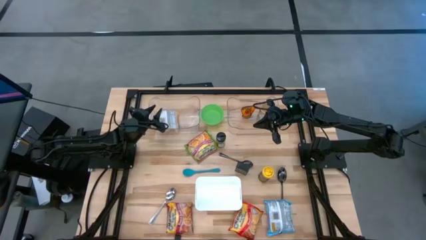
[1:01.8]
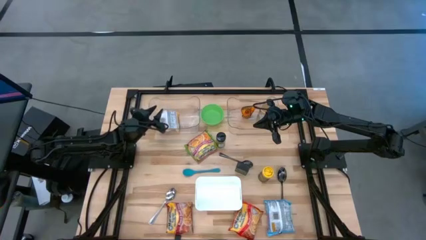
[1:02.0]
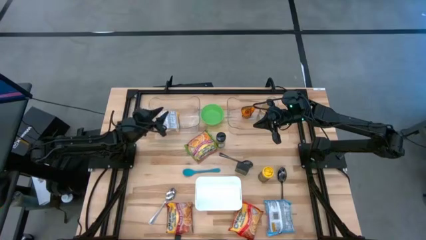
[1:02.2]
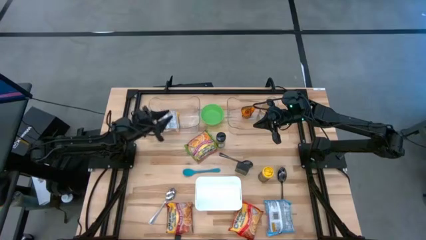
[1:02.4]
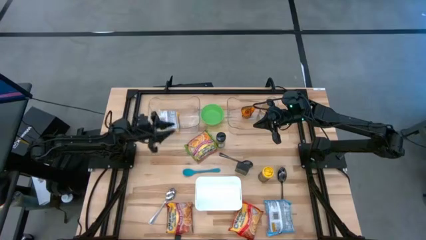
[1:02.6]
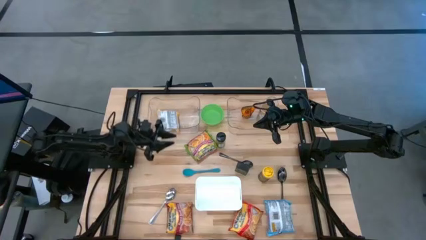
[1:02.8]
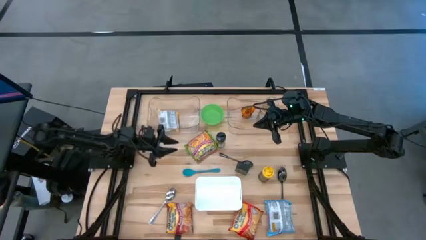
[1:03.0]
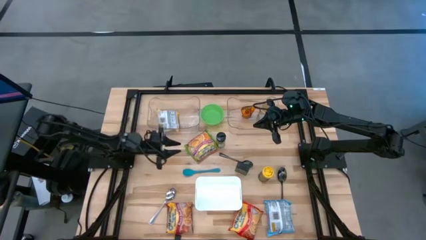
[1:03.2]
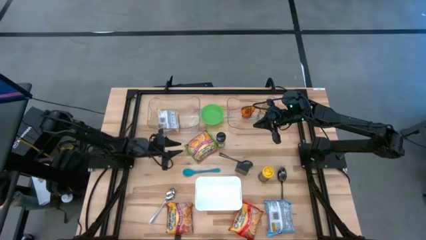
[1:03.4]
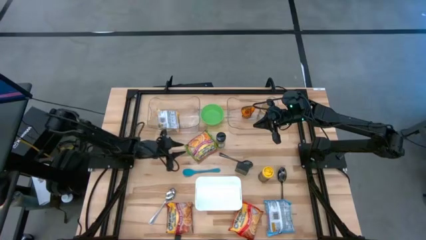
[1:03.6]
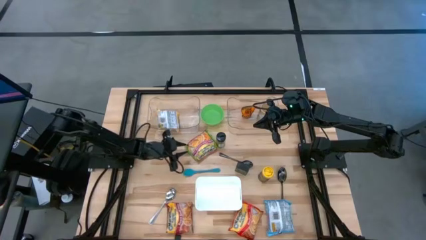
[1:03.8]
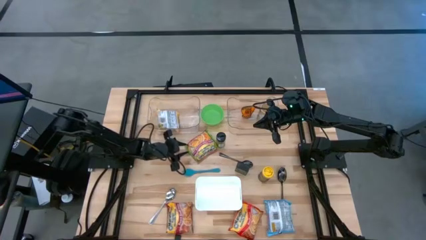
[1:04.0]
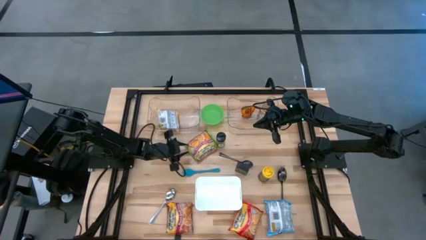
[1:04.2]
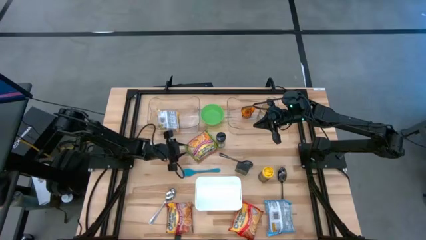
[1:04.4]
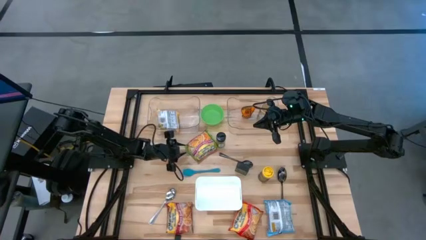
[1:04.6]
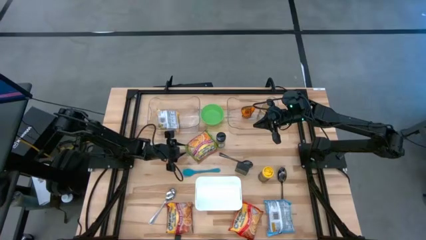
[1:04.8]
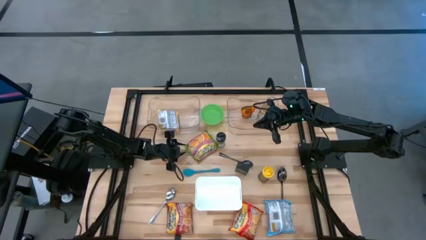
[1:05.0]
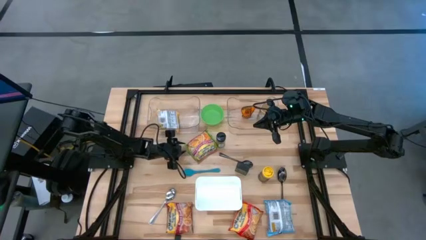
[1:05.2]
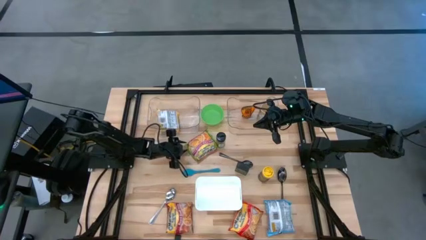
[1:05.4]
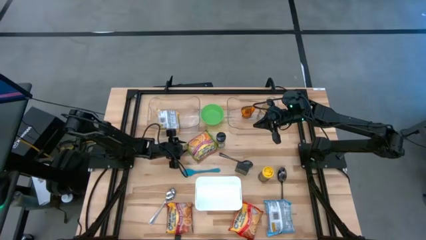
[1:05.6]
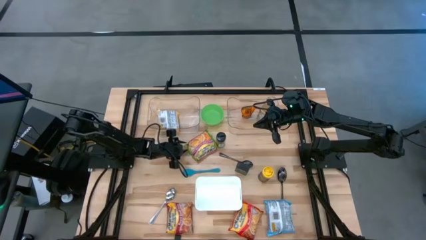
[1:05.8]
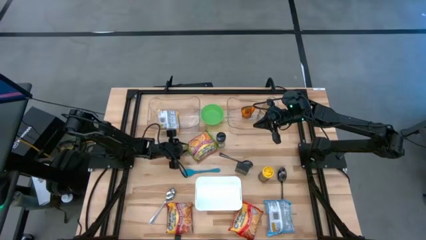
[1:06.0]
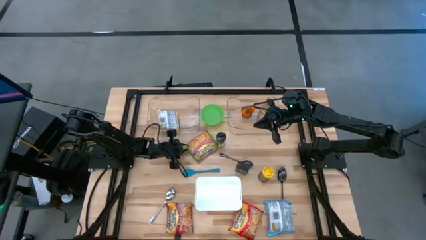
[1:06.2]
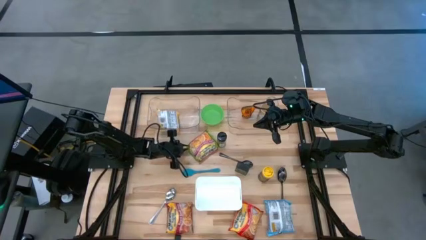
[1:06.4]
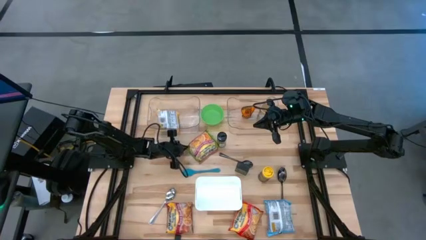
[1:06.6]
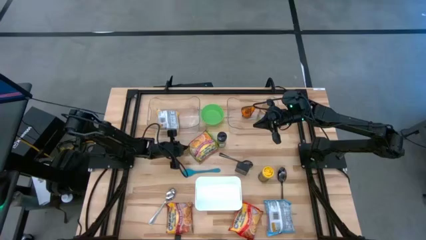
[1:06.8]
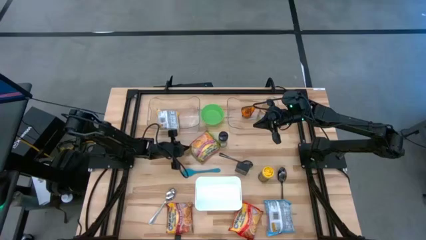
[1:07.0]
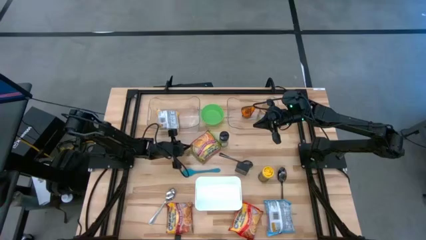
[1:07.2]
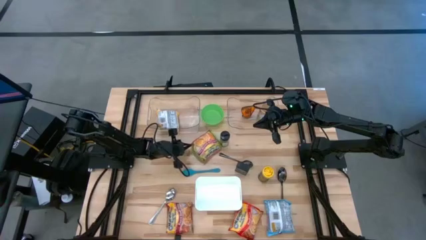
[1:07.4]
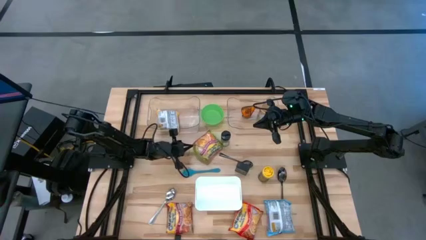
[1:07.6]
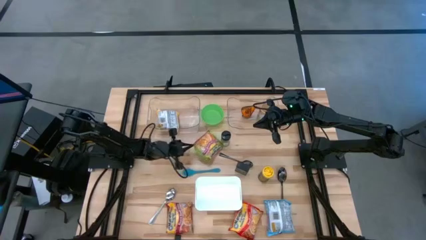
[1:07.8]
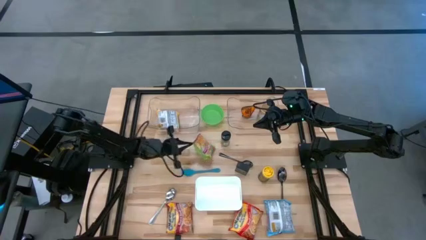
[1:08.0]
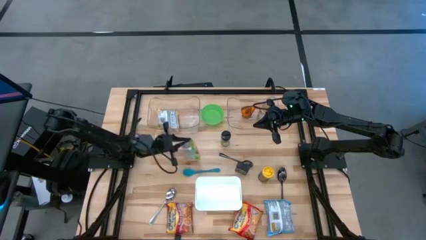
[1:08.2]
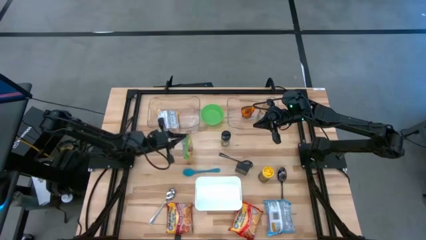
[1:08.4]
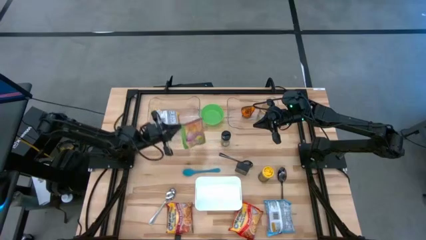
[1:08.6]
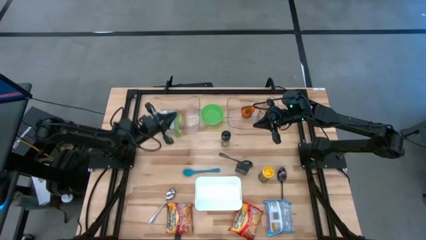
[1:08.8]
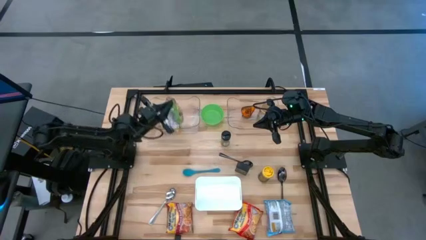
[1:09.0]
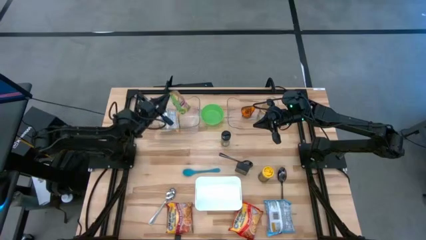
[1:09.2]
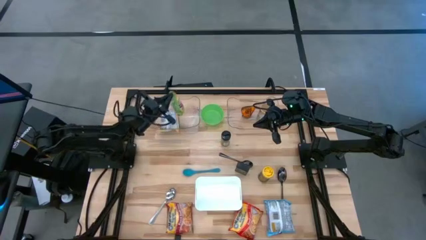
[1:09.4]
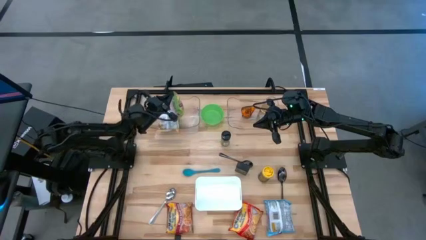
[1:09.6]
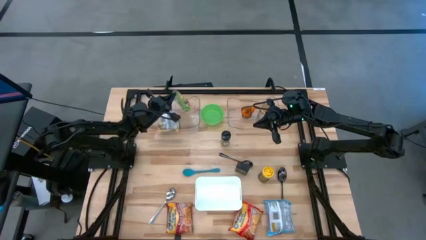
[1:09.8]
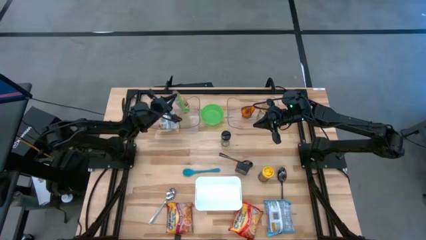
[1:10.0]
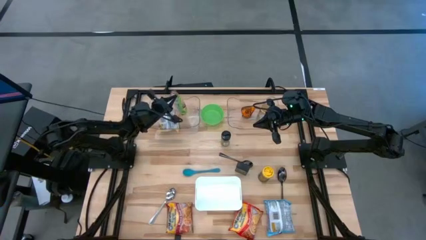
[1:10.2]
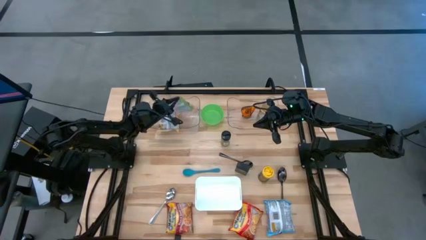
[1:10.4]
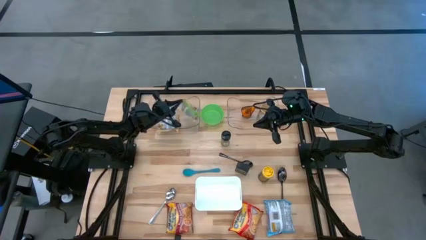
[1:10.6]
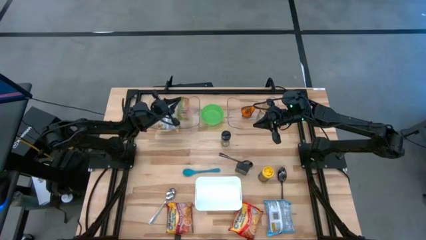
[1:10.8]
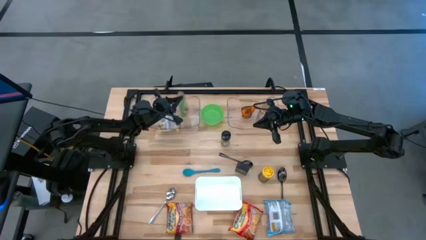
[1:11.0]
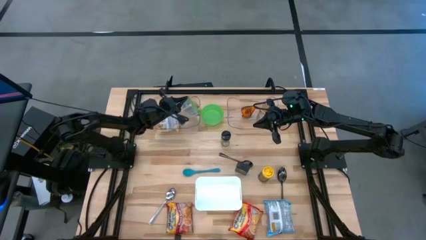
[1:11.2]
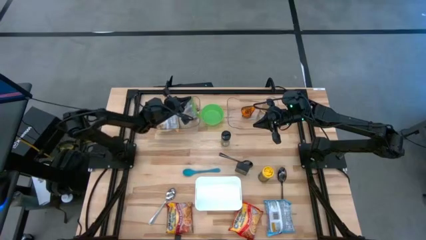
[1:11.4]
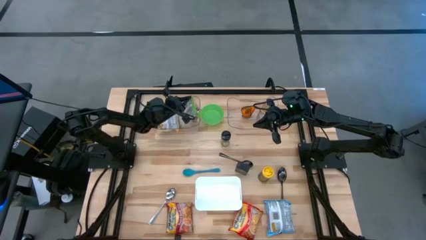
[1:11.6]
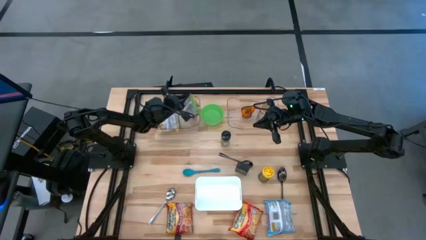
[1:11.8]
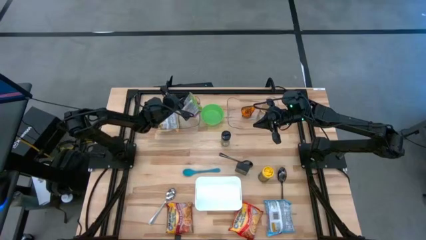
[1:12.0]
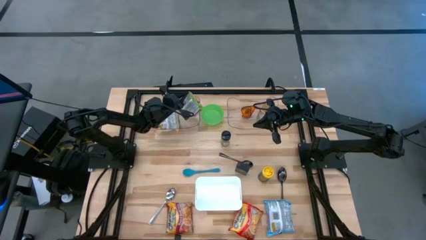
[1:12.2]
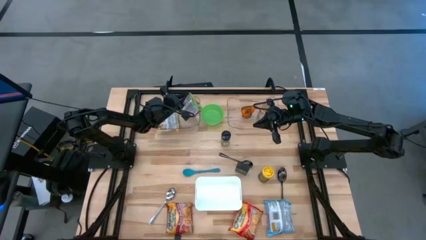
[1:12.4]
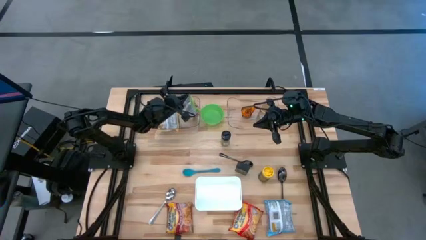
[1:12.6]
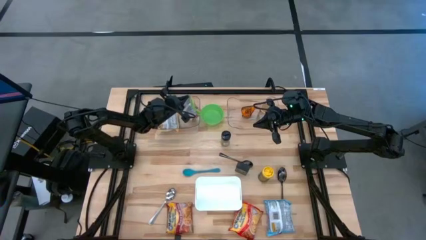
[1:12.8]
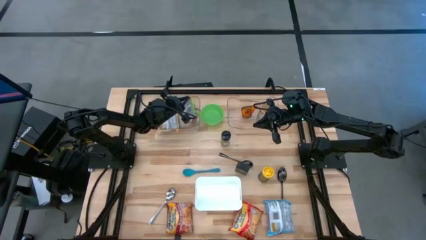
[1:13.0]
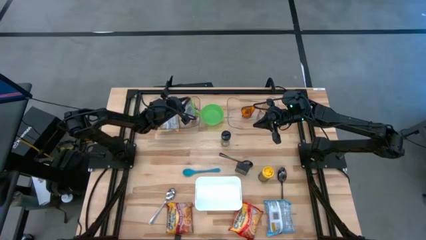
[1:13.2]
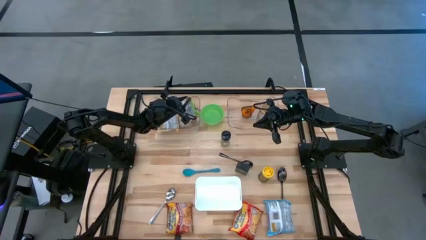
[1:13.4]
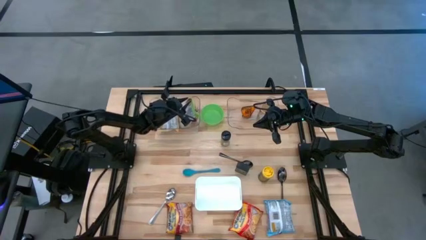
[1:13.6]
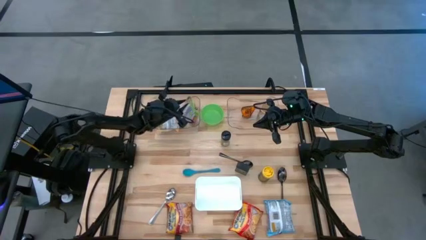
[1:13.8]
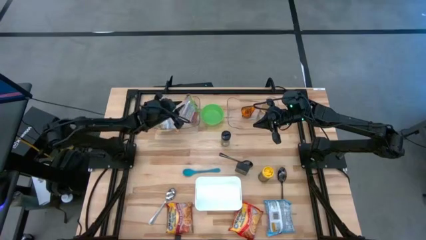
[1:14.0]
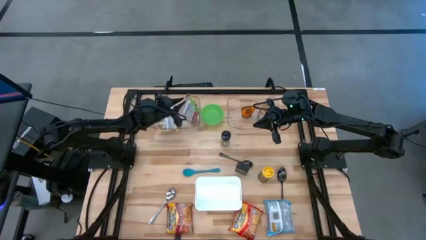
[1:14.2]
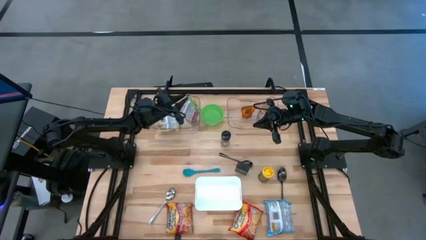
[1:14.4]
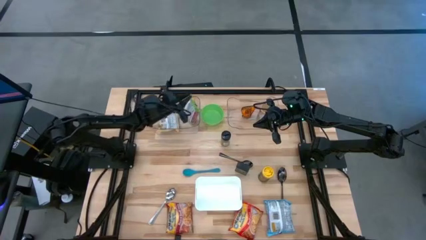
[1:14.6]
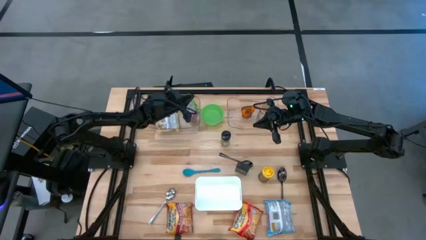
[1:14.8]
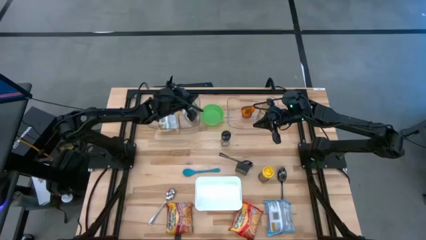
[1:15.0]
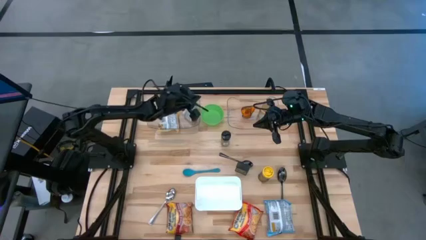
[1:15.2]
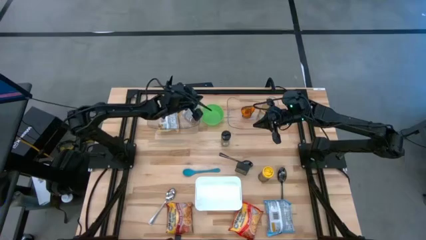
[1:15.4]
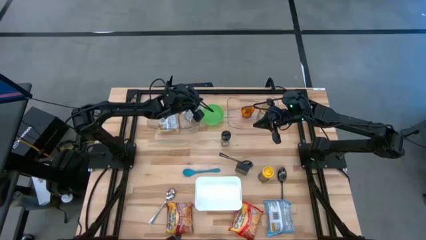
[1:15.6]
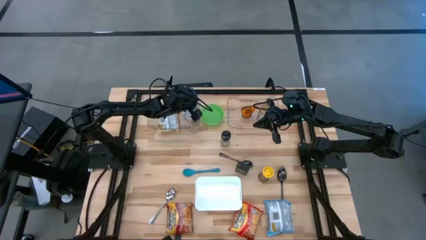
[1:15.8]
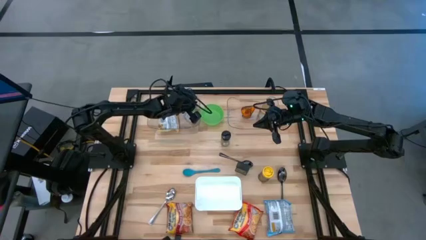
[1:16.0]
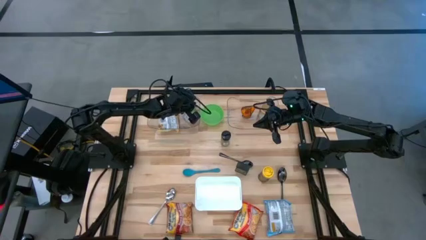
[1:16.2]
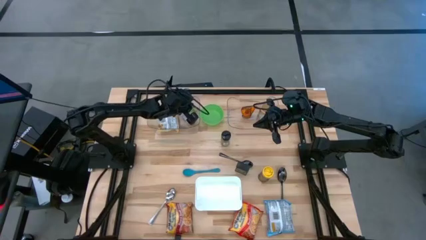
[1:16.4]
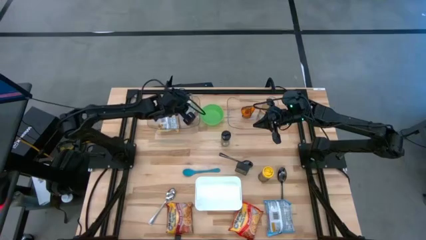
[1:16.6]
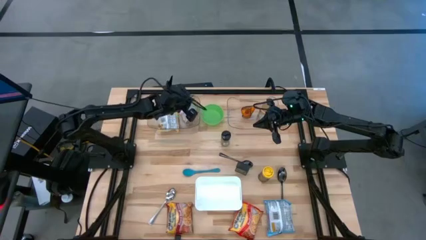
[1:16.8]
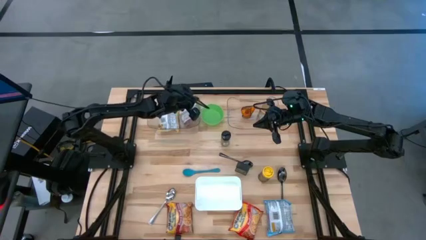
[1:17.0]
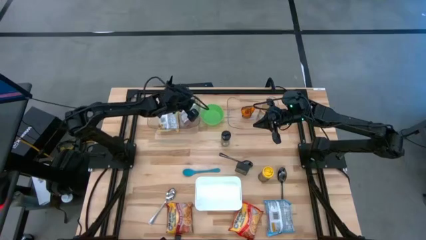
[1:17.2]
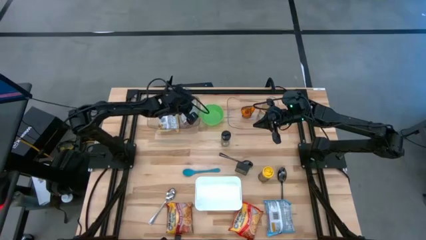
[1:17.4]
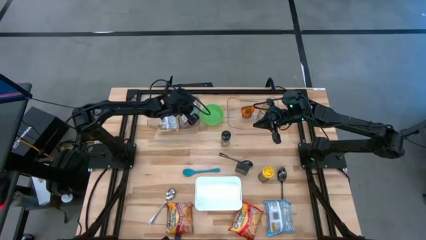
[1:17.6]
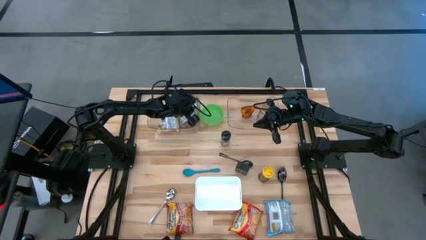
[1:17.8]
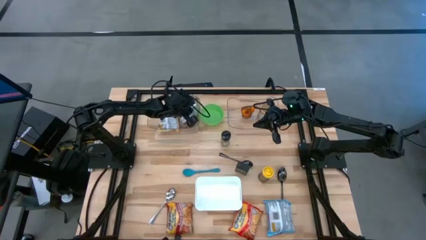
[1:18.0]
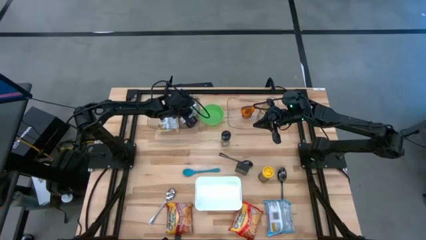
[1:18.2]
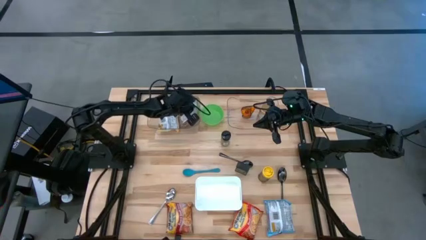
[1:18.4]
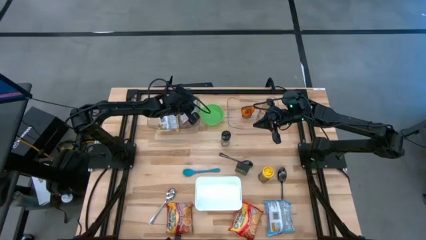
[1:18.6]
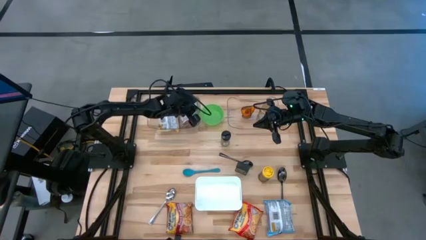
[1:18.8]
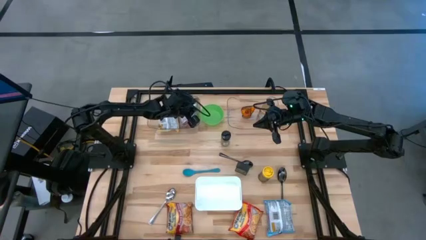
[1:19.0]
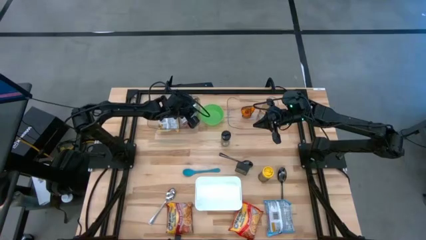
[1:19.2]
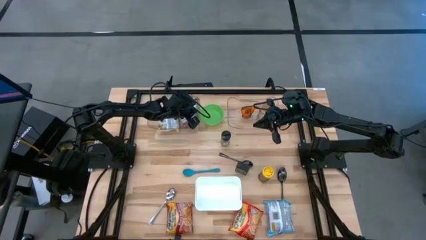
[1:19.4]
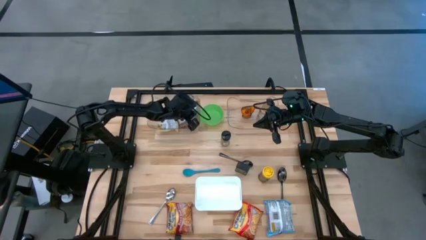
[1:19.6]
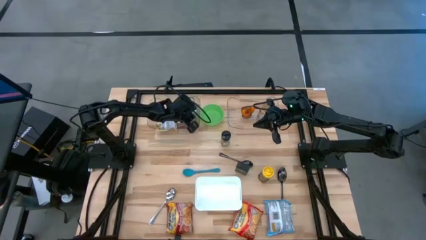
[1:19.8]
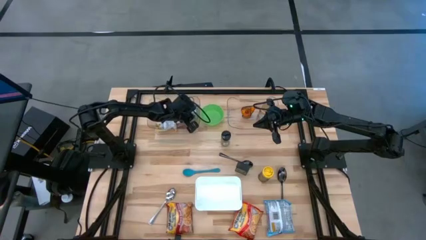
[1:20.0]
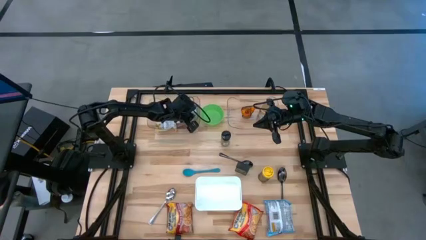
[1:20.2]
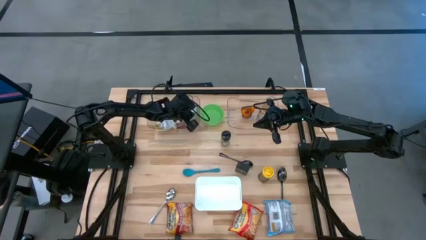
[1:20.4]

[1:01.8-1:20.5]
Task: Pick & Place Food Item
Put the green noodle pack into the left transparent bin
